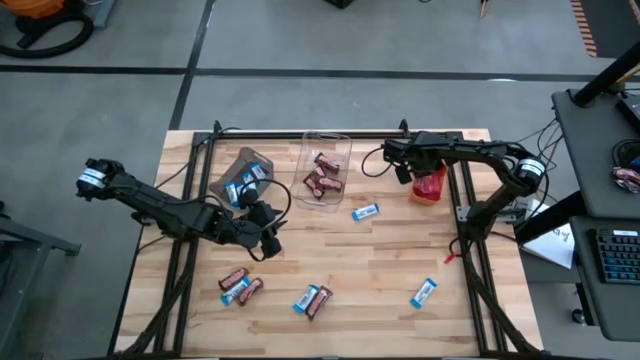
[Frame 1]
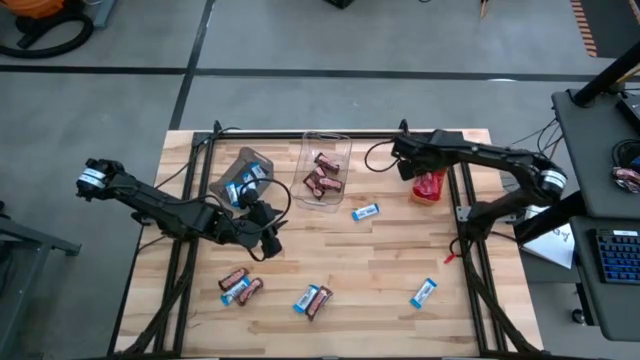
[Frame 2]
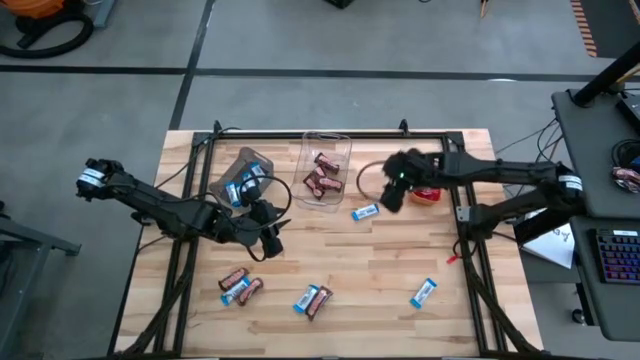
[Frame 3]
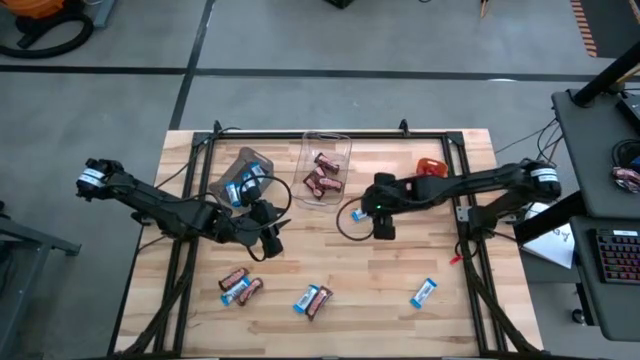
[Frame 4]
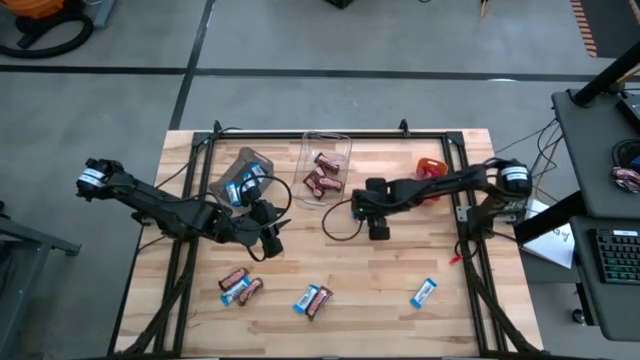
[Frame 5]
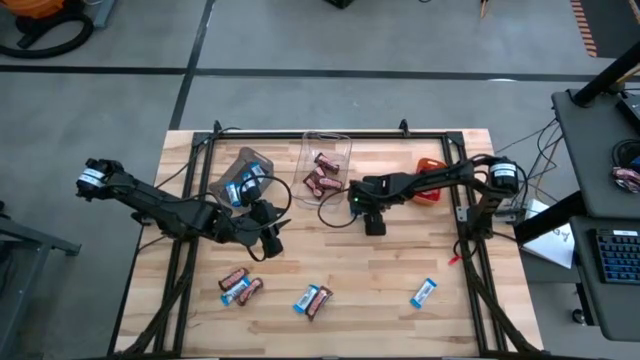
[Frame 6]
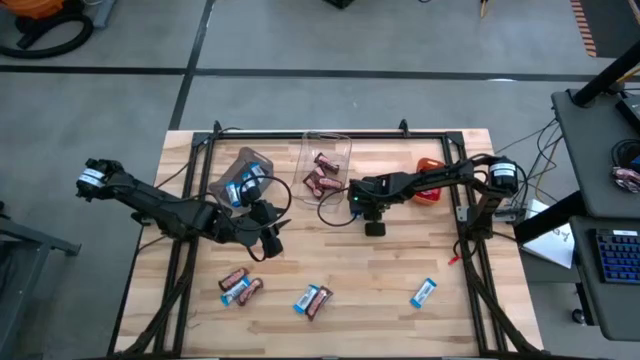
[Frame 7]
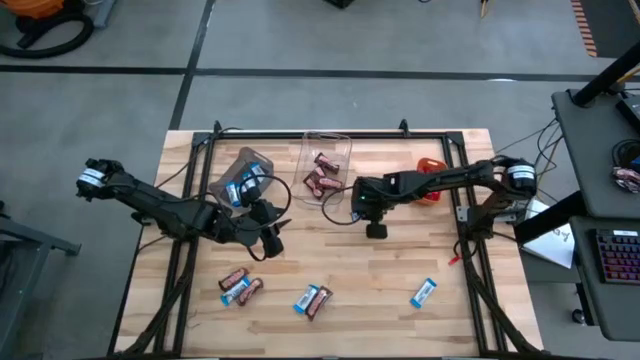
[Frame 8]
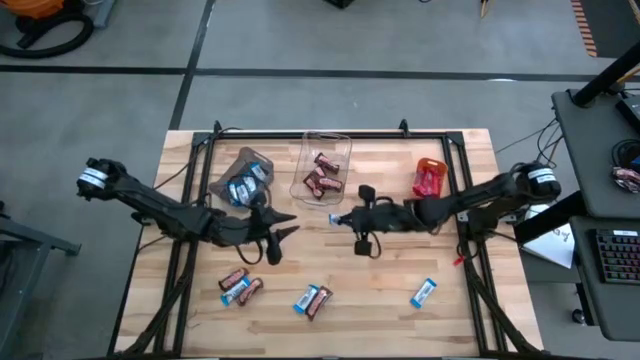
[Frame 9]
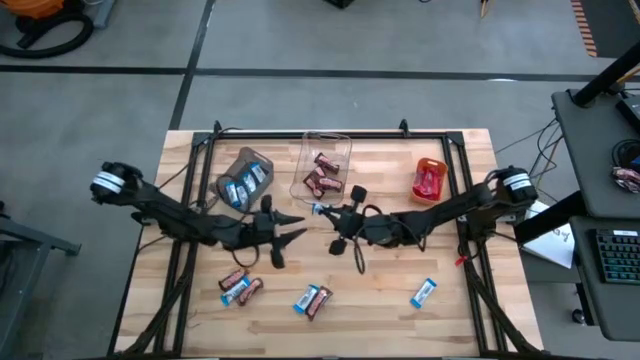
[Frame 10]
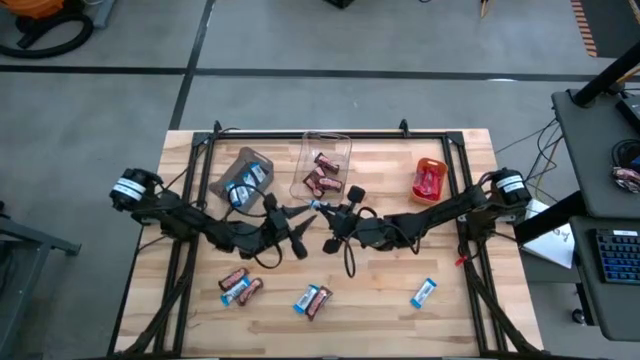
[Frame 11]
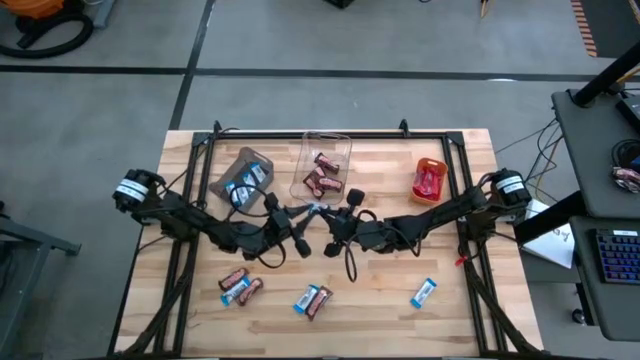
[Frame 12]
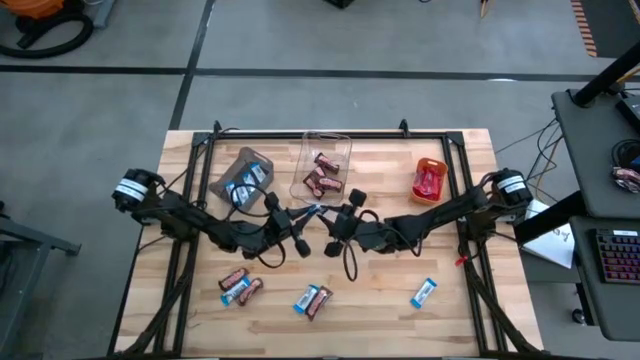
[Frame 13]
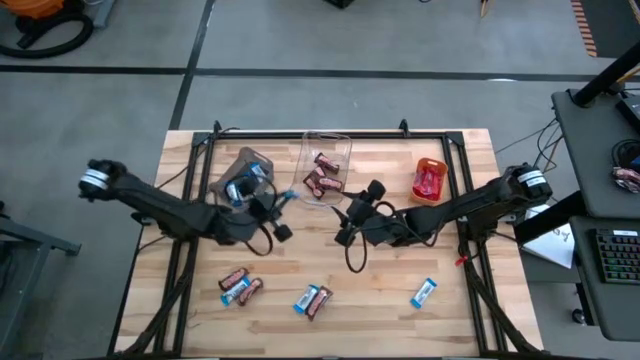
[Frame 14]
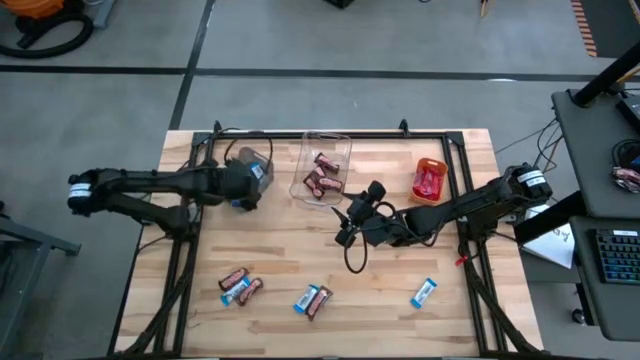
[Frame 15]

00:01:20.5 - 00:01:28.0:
Task: Sort candy
Put the blue chocolate into the black bin

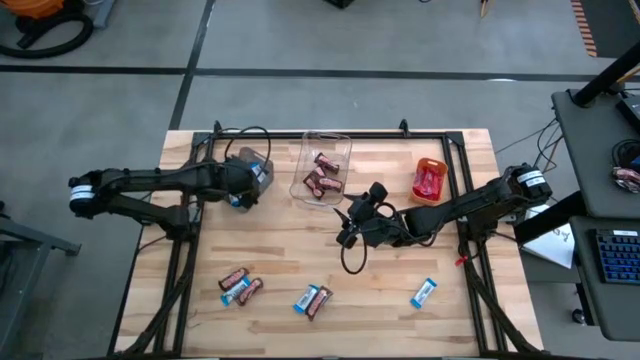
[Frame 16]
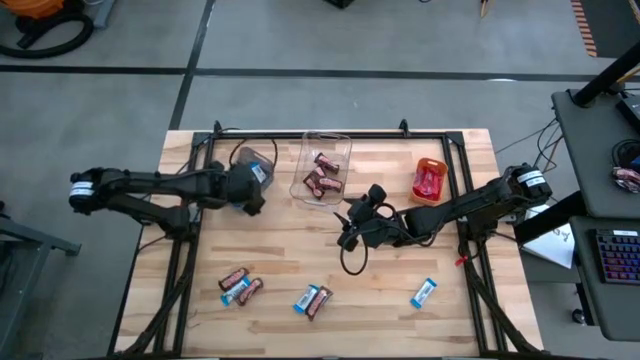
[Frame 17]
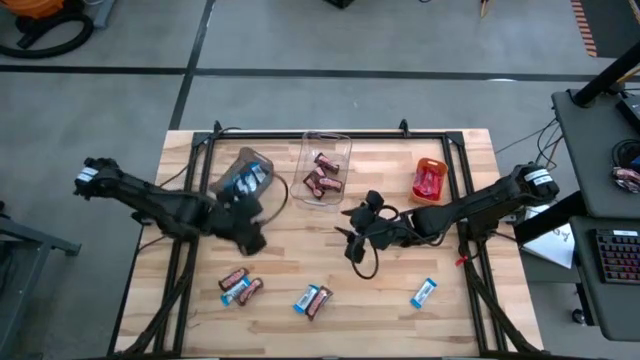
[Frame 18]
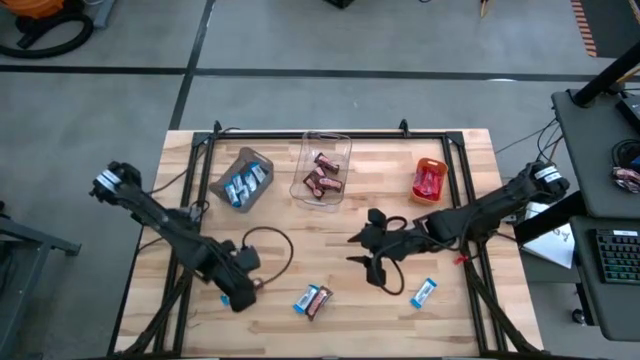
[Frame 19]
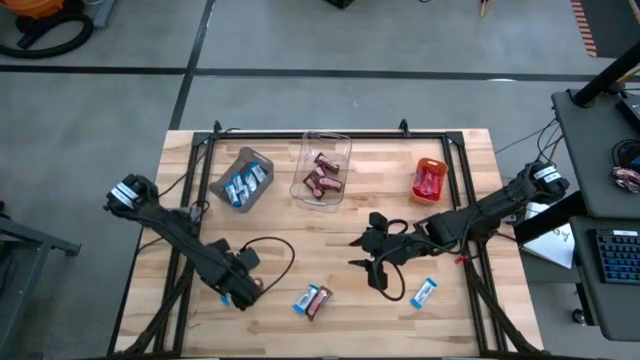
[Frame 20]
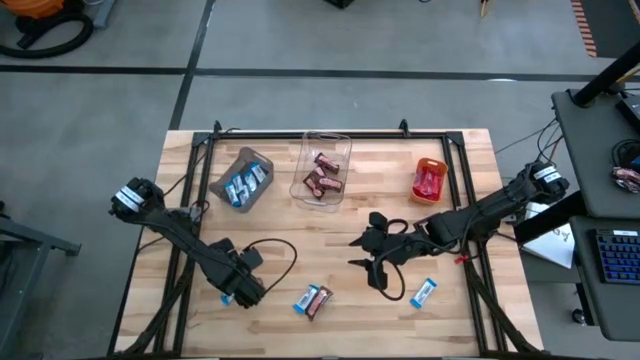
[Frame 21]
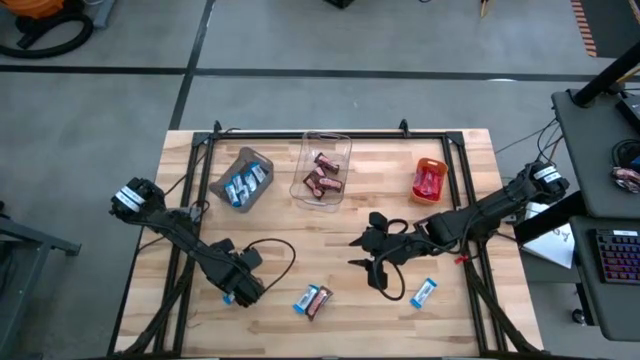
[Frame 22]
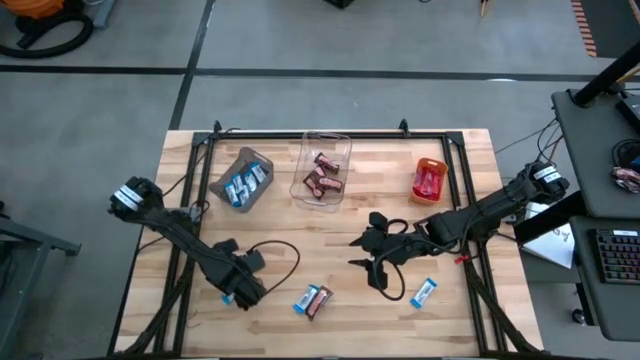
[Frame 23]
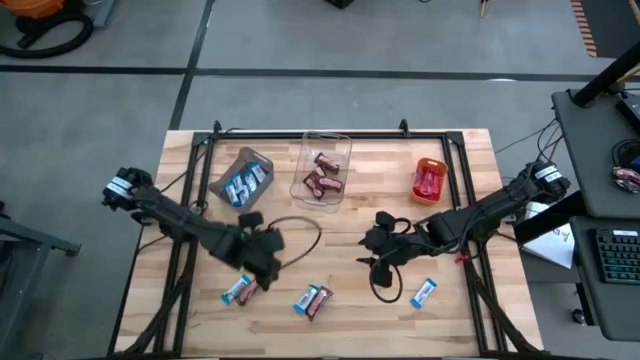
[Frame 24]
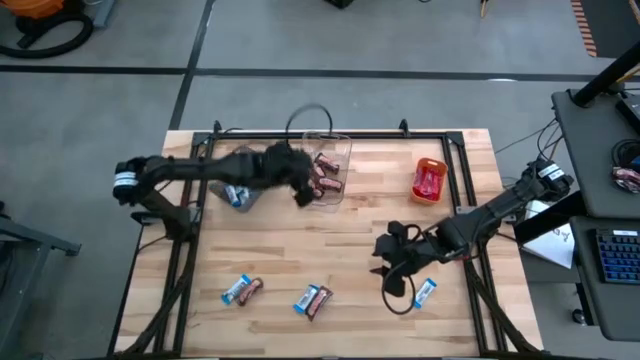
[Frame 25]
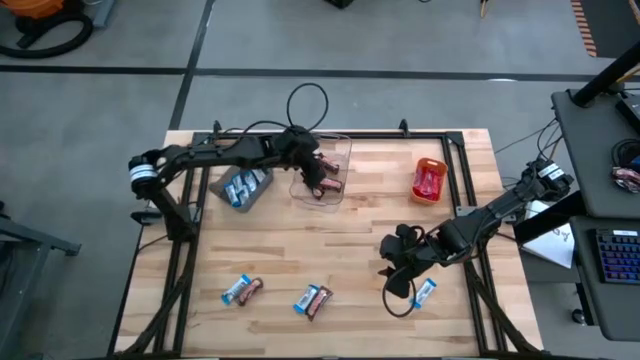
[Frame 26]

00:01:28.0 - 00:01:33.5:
Put the brown chocolate into the transparent bin

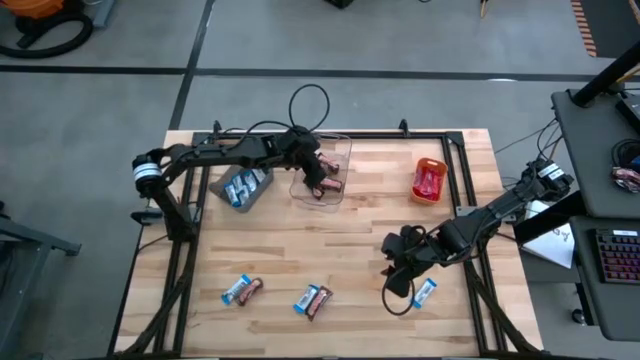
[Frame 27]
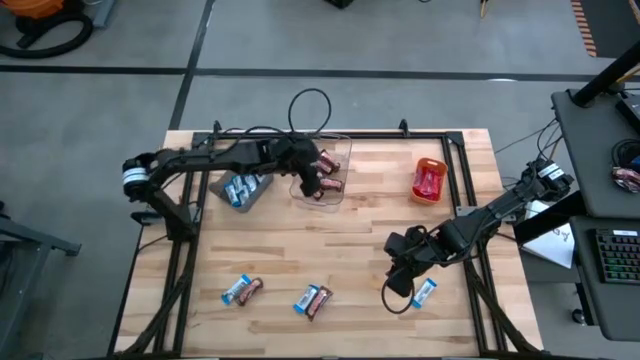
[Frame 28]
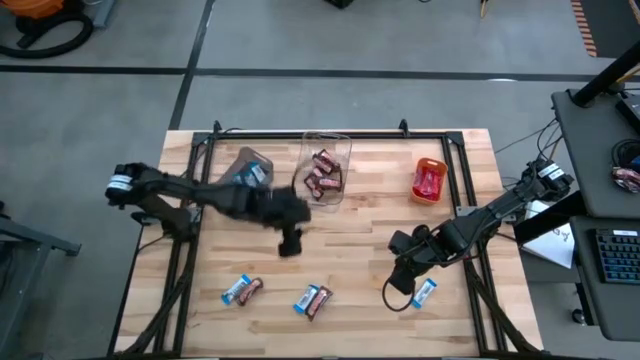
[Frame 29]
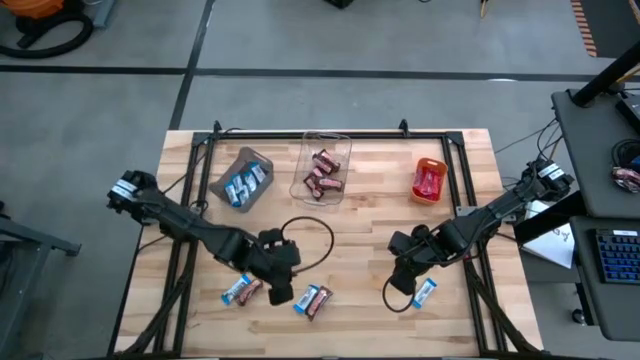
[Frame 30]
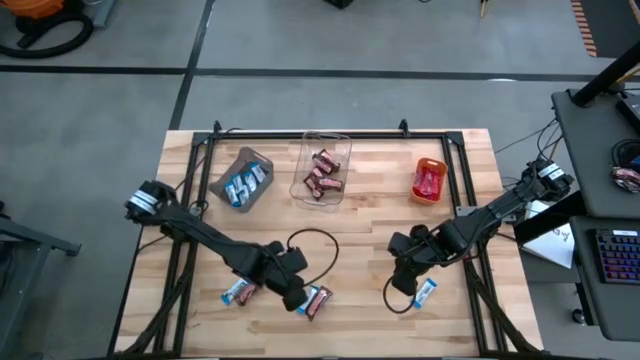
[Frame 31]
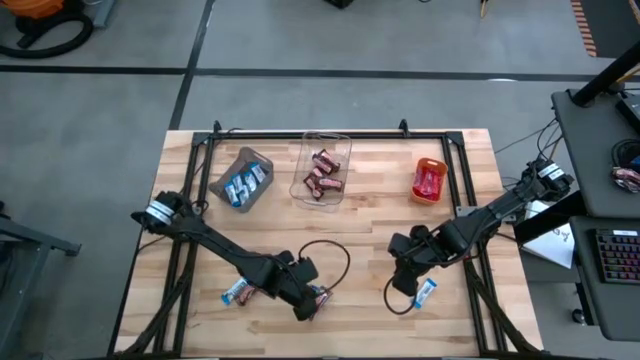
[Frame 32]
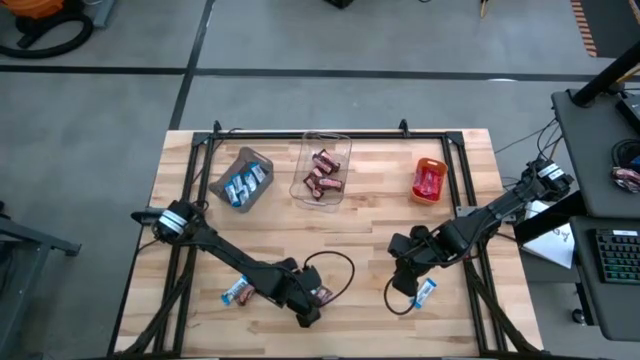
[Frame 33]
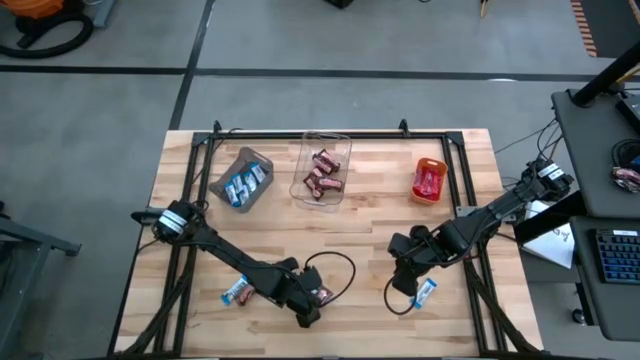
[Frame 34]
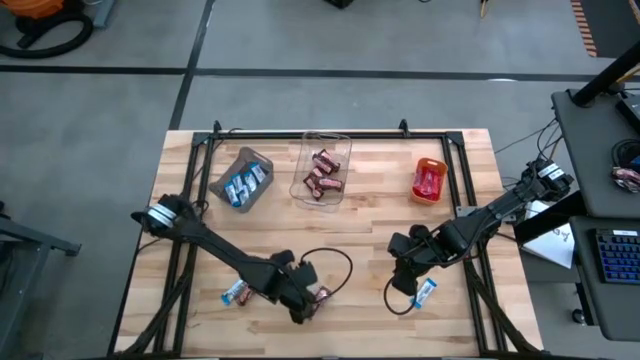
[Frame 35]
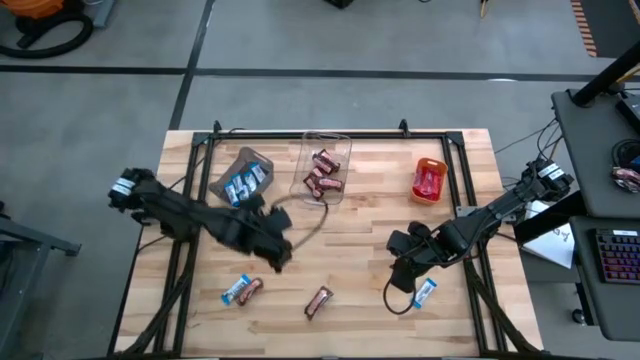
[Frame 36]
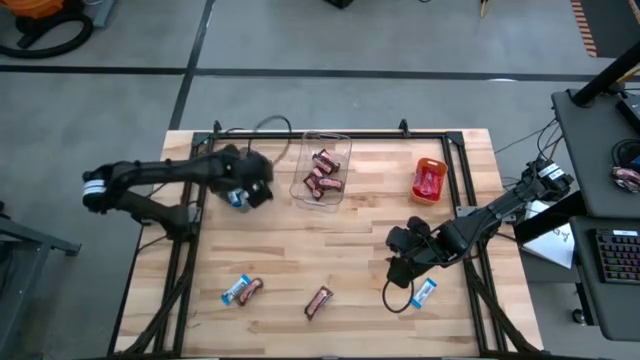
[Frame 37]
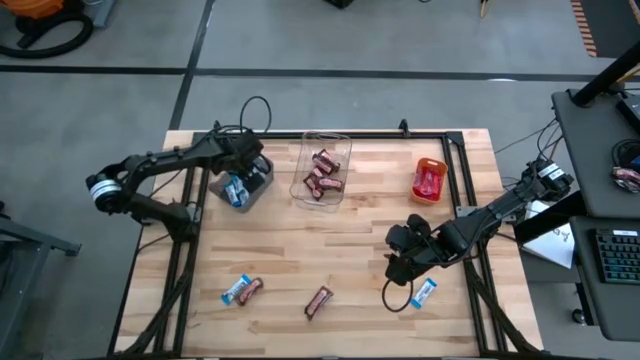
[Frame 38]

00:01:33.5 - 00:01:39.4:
Put the blue chocolate into the black bin

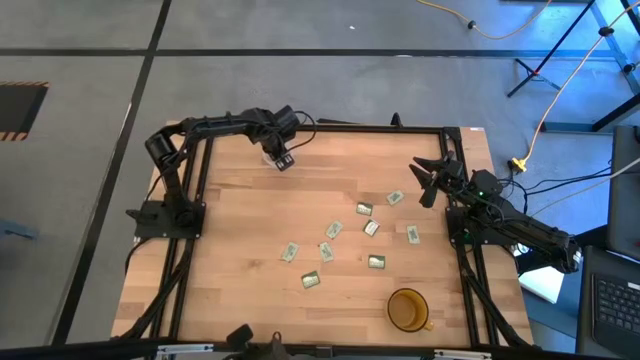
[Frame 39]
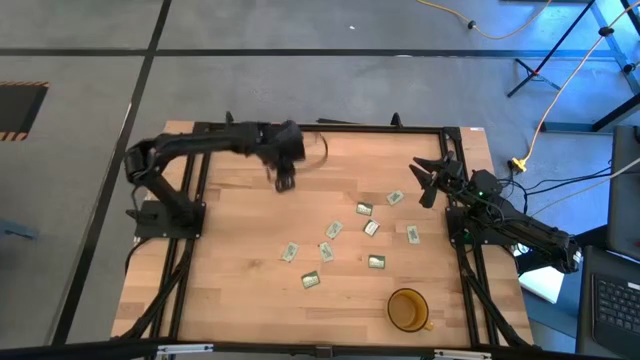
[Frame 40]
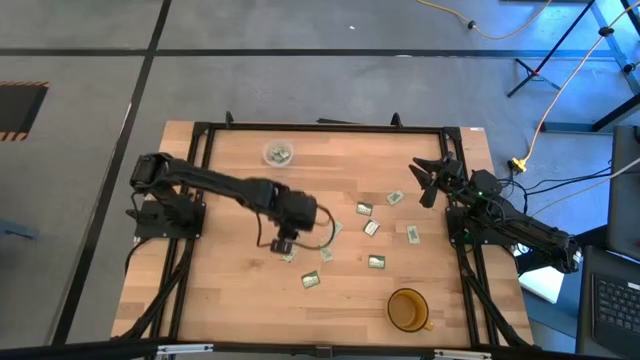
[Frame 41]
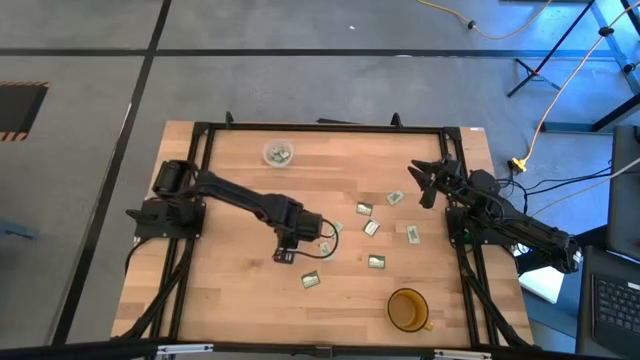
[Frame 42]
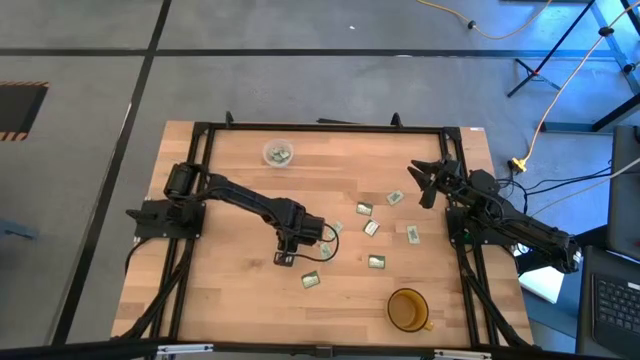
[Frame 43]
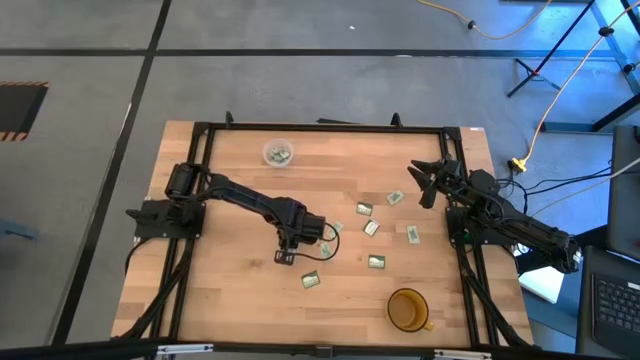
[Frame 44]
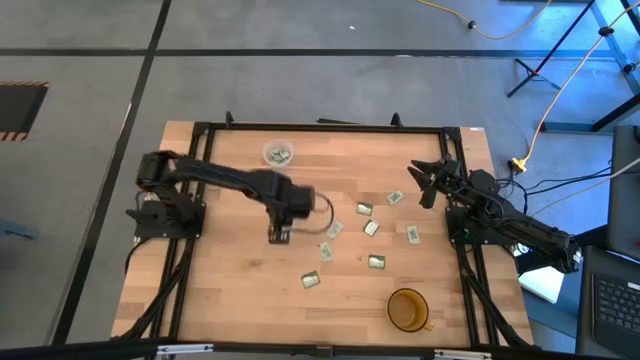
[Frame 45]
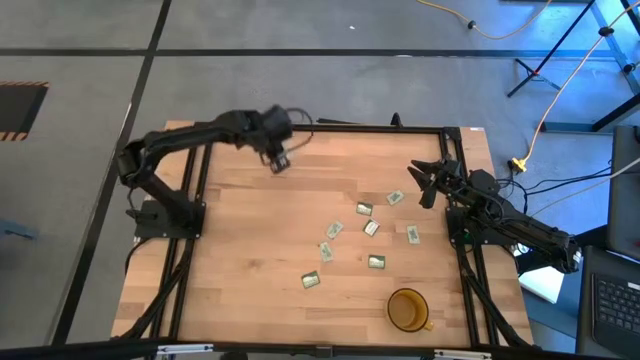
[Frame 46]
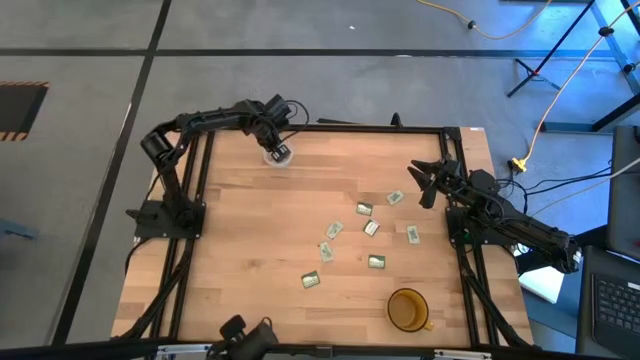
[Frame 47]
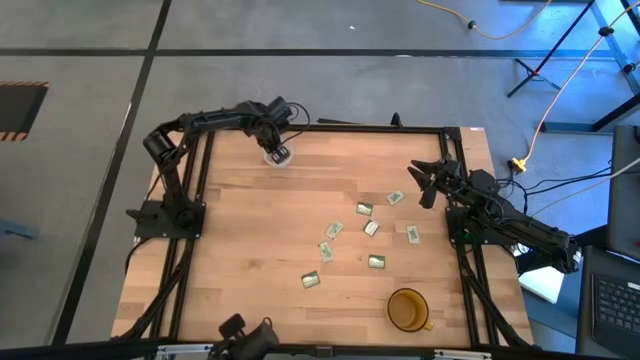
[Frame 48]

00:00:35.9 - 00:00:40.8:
Task: Pick and place Stevia / Truvia into bins
Put the stevia packet into the transparent container
